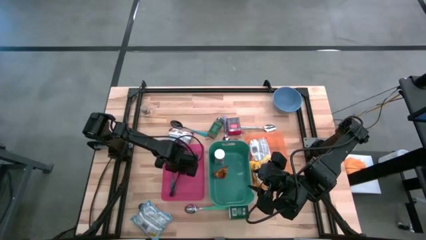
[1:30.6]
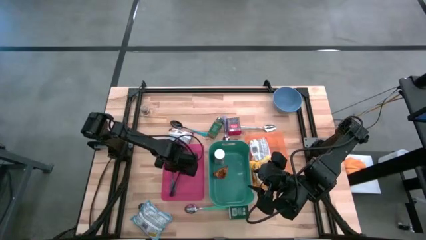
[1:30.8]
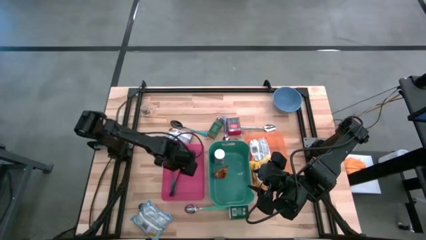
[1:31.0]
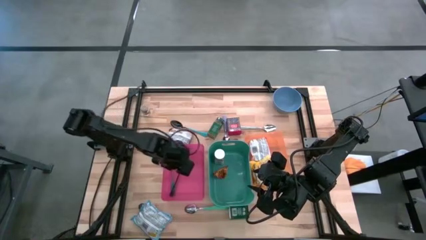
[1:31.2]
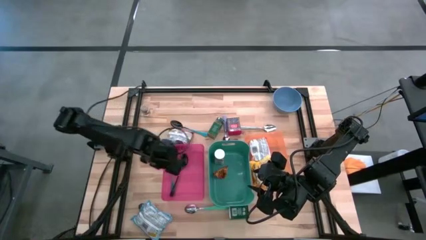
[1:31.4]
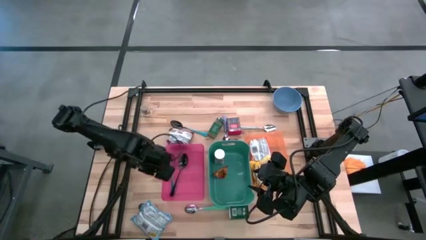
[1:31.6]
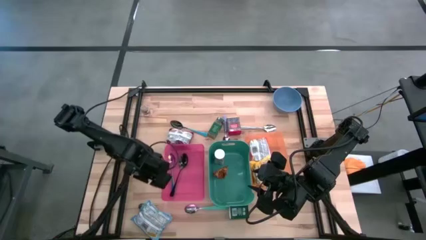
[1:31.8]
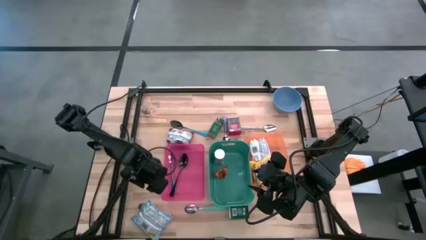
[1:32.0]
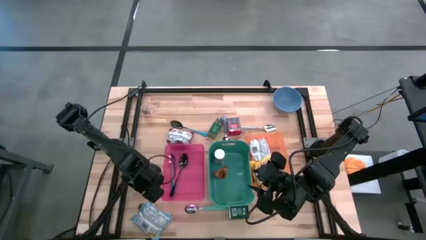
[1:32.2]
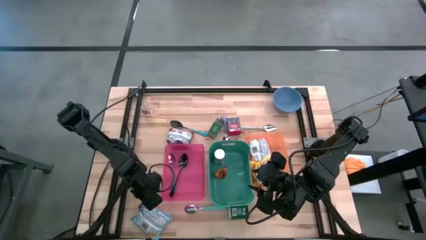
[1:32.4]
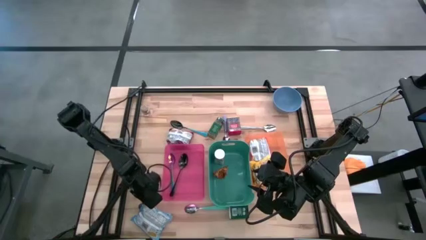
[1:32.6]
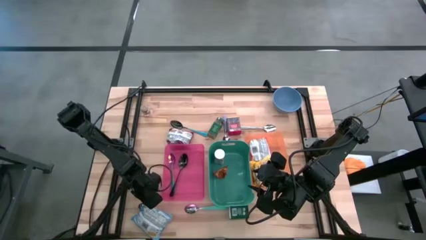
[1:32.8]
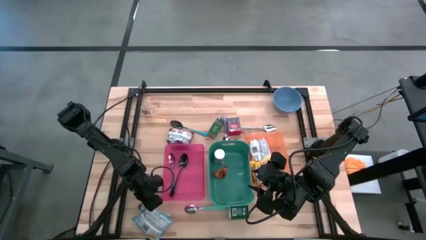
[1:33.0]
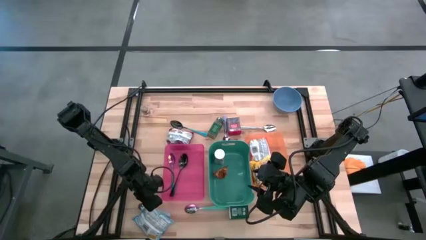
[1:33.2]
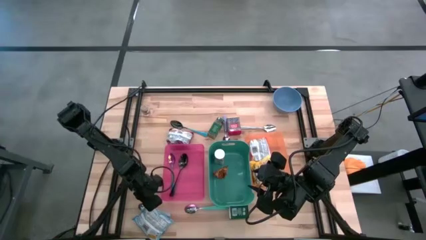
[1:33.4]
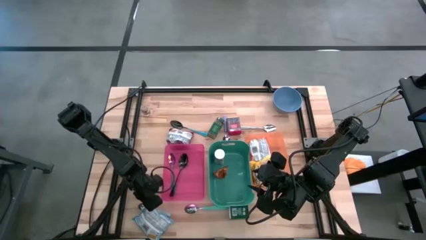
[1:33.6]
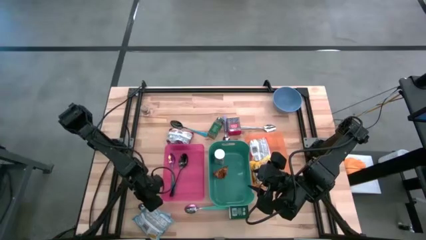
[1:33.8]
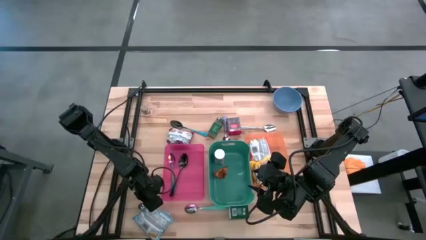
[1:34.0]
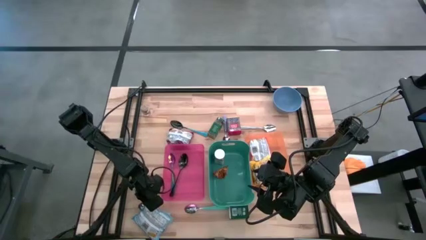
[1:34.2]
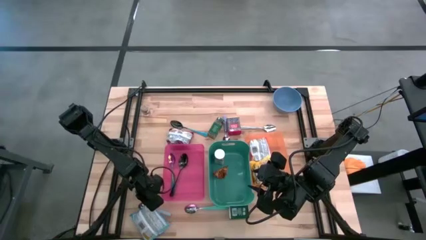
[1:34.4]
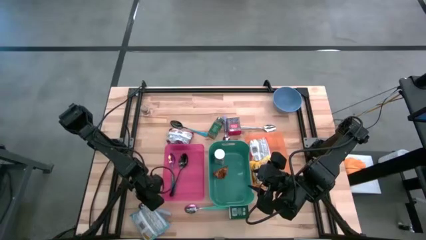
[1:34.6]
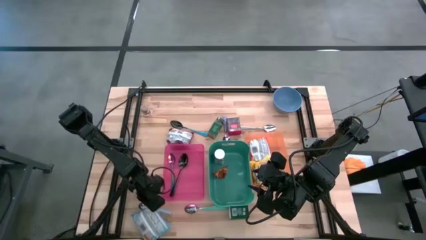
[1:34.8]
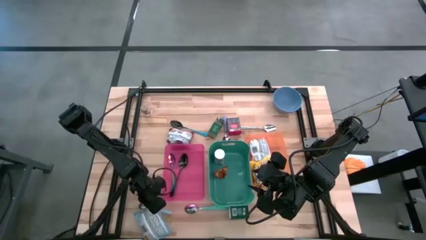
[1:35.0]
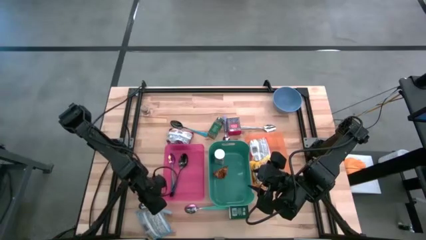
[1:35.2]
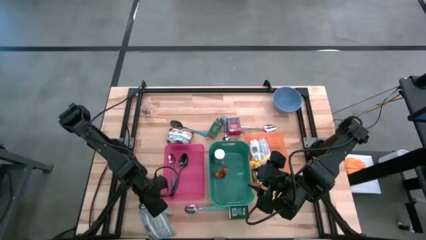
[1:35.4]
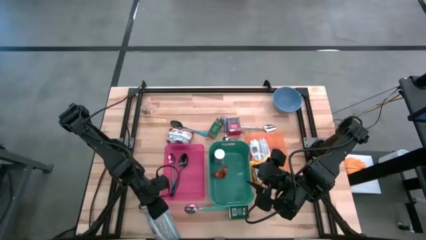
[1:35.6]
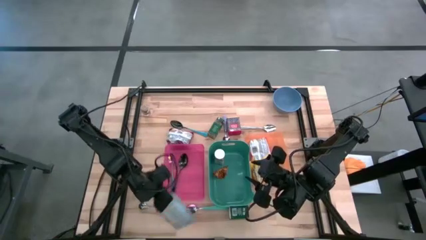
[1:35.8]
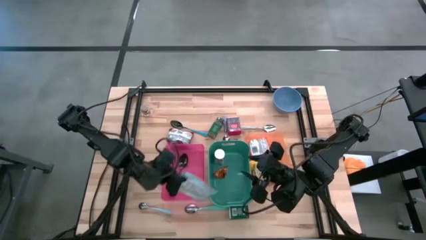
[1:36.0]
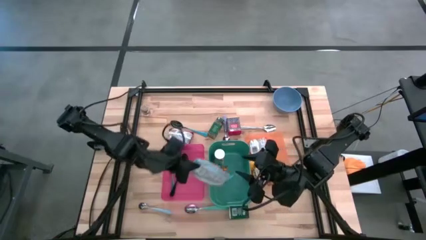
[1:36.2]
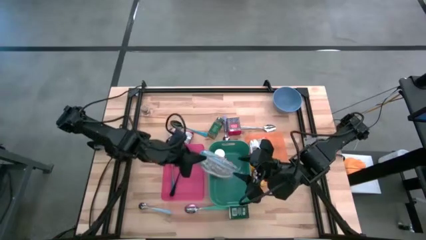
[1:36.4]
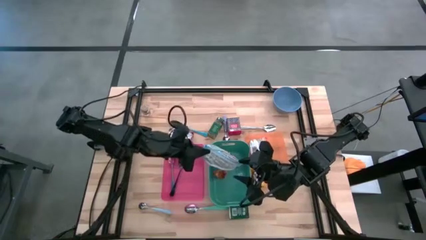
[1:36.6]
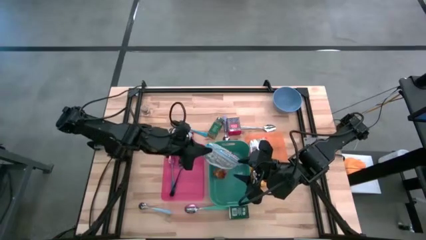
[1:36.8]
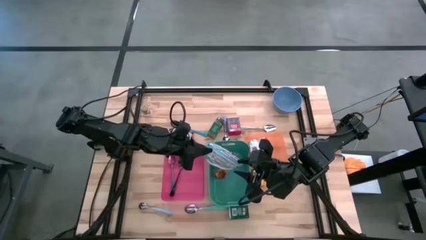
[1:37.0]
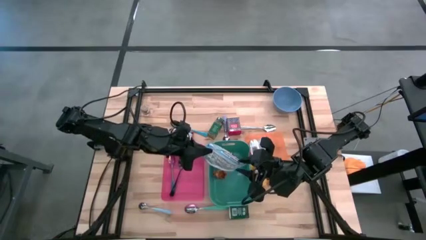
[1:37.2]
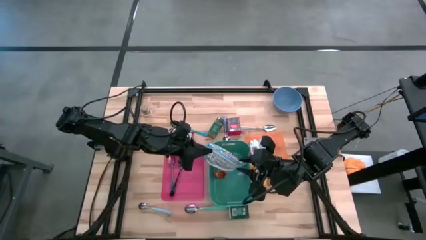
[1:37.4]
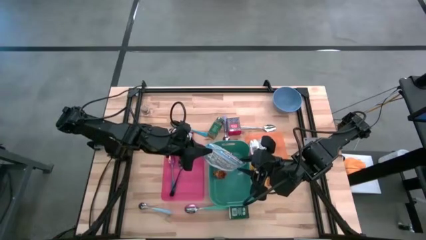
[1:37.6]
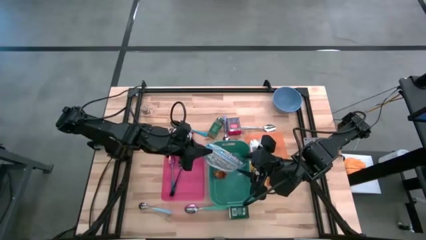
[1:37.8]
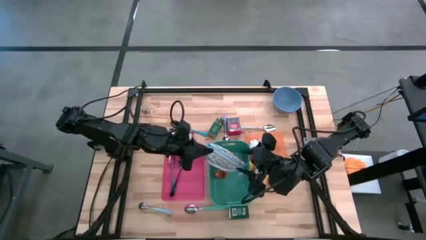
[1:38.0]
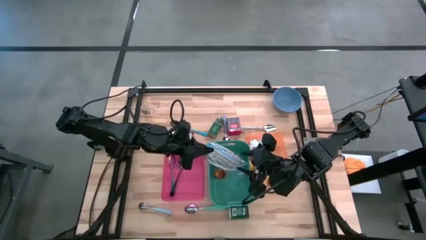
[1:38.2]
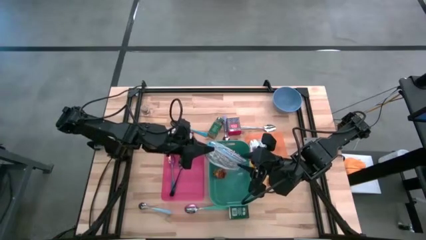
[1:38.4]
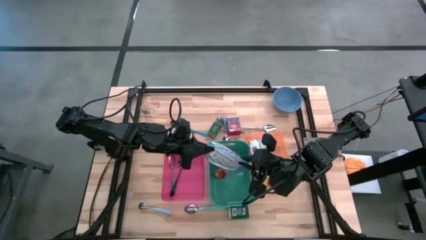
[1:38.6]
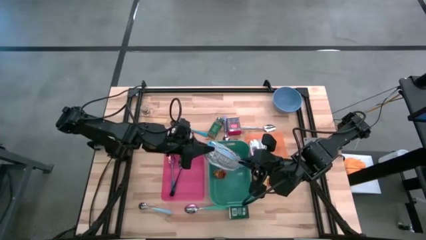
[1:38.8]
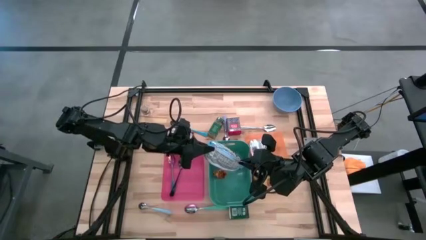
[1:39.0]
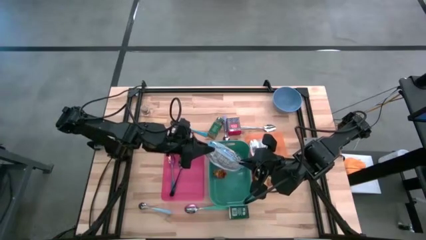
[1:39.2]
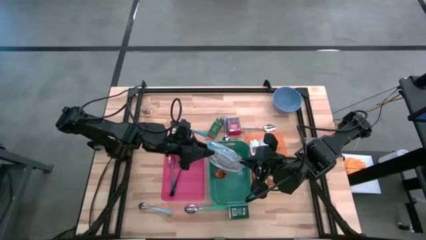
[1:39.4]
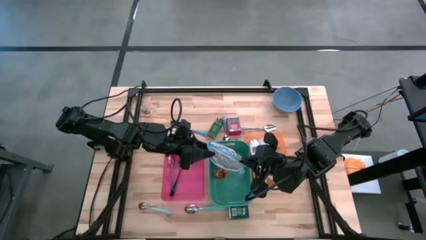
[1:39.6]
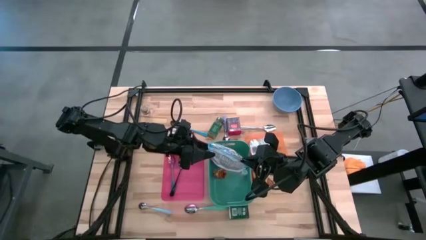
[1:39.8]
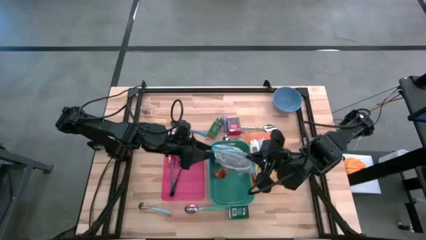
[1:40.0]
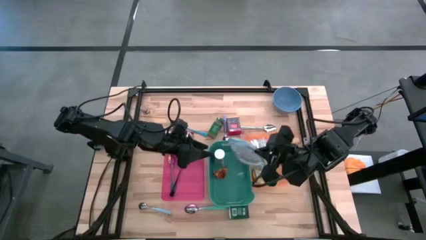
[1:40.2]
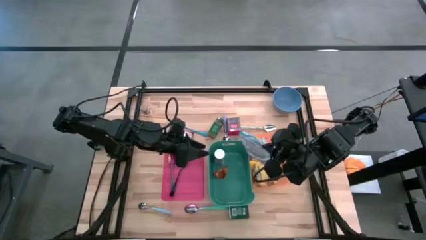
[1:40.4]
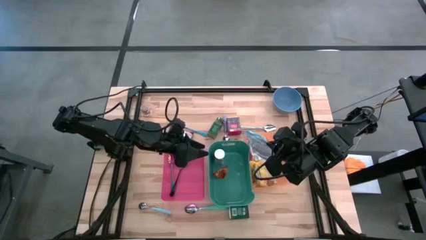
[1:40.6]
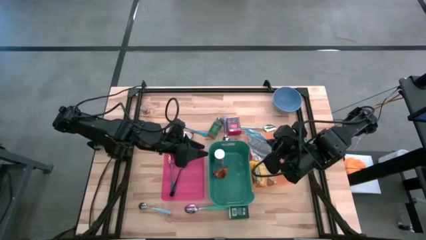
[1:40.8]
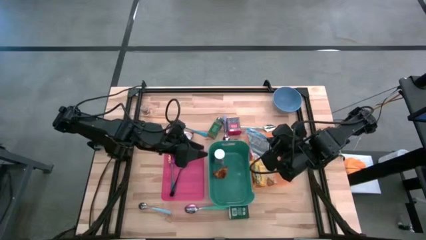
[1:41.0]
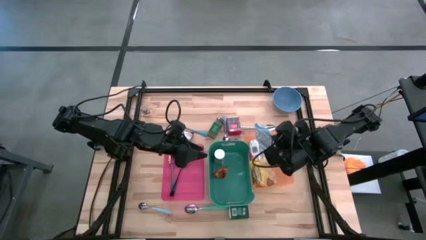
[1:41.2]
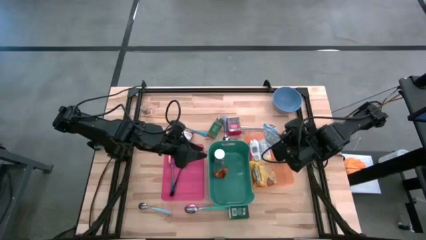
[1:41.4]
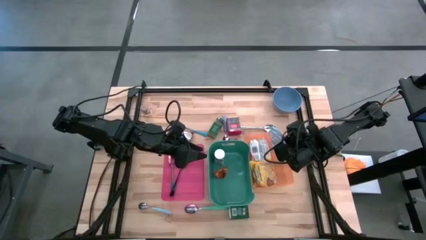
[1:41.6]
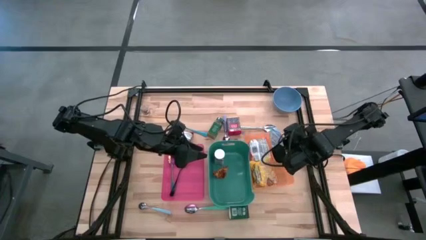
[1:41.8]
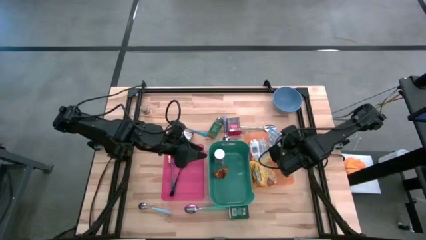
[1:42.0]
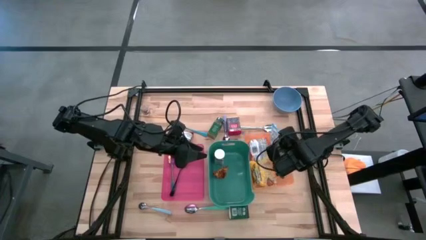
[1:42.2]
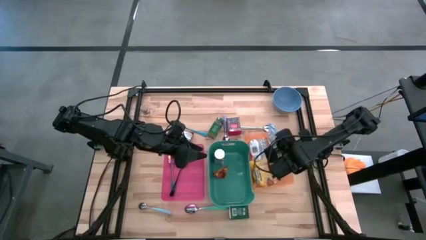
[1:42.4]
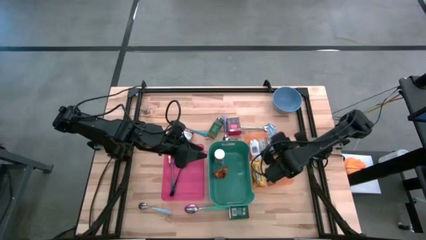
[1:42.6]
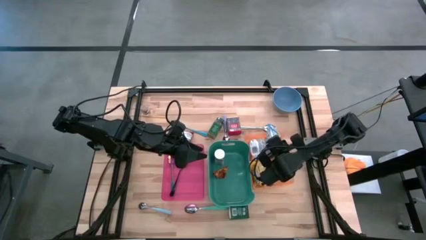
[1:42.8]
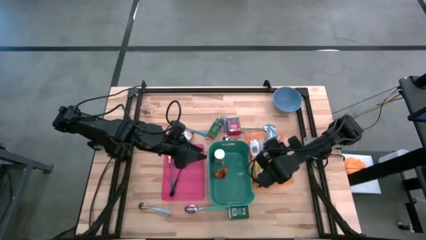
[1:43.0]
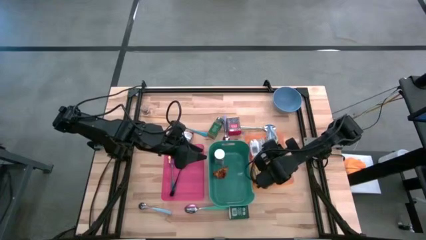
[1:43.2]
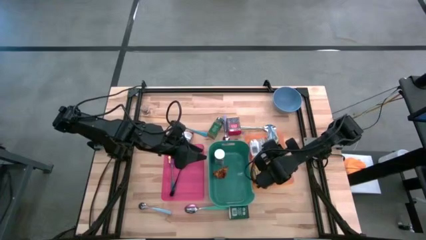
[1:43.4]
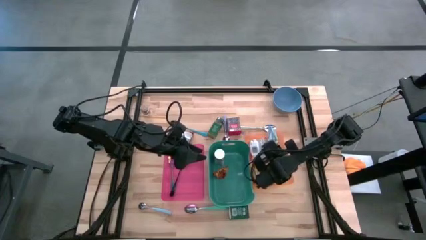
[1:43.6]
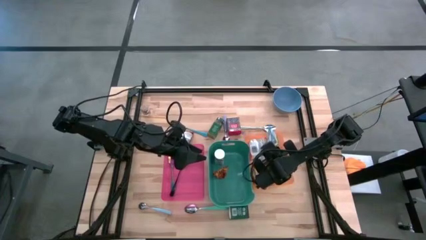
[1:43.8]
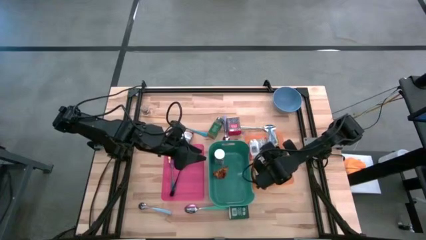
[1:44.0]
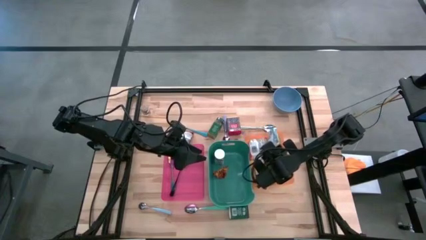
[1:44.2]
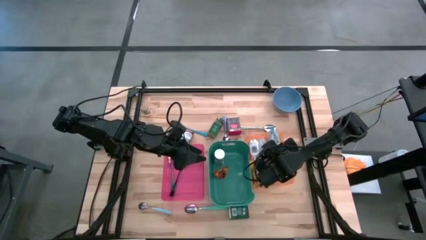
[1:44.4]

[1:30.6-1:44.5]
Put the blue noodle pack into the orange bin
